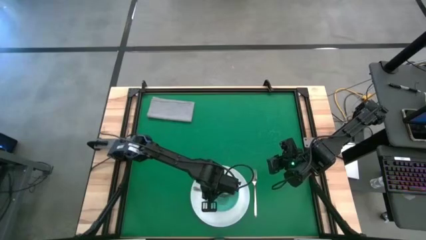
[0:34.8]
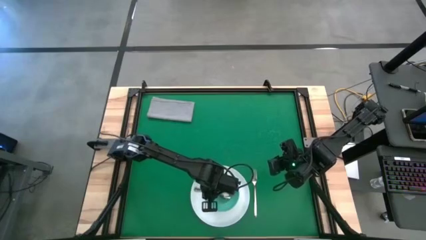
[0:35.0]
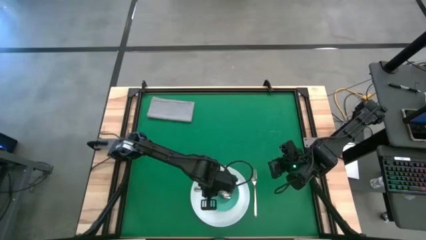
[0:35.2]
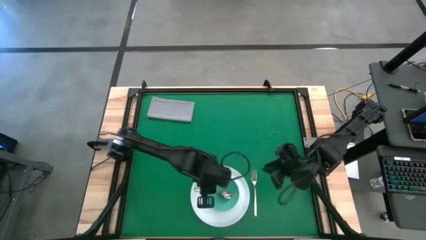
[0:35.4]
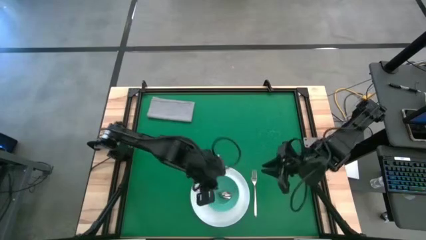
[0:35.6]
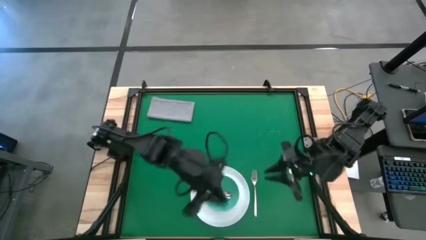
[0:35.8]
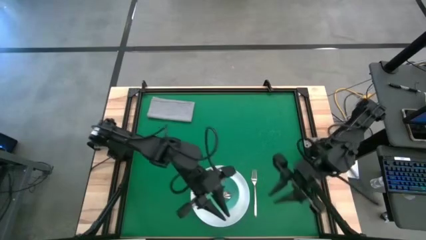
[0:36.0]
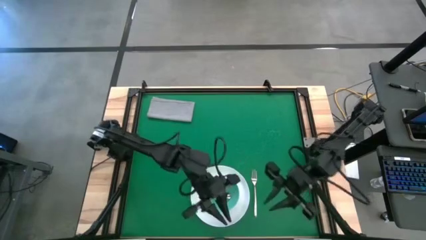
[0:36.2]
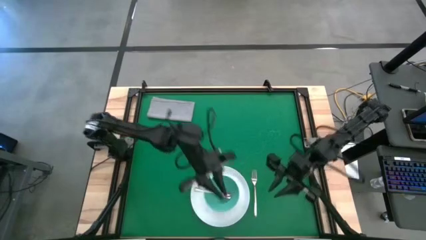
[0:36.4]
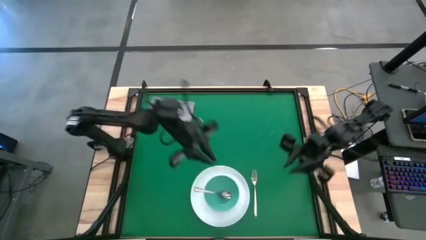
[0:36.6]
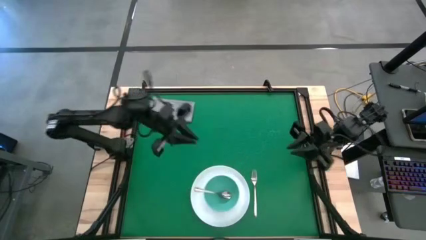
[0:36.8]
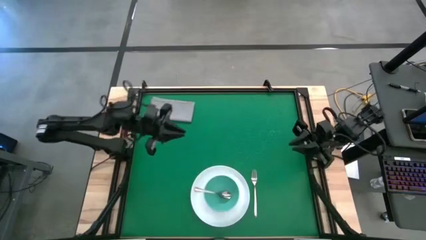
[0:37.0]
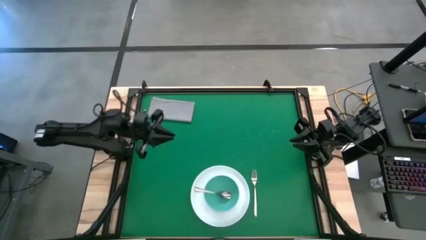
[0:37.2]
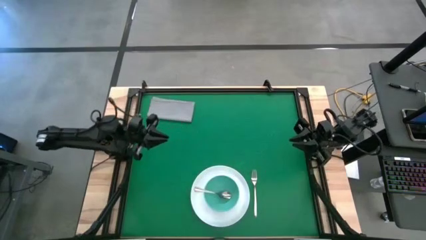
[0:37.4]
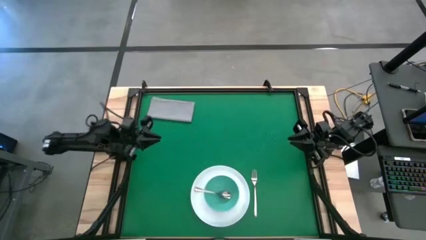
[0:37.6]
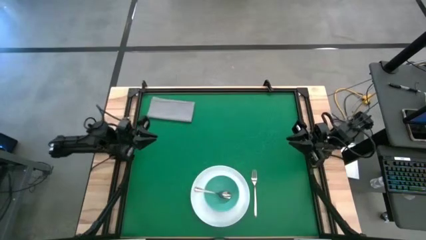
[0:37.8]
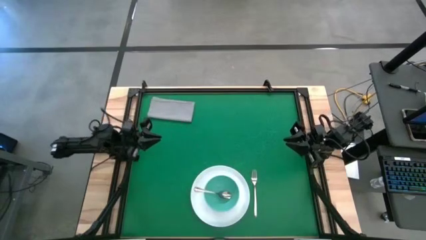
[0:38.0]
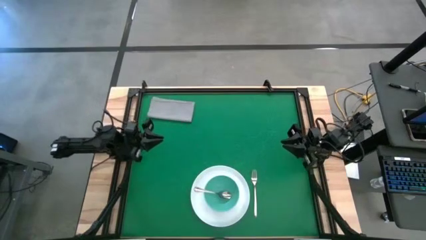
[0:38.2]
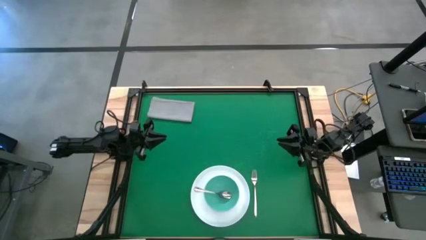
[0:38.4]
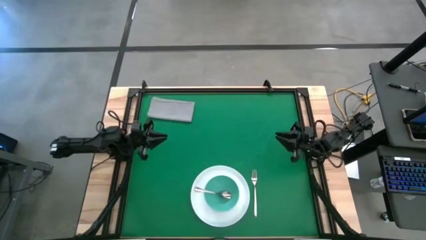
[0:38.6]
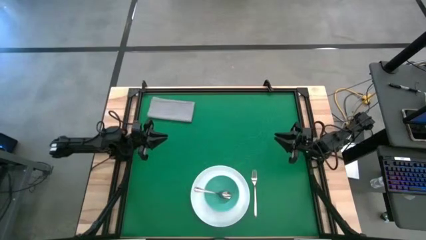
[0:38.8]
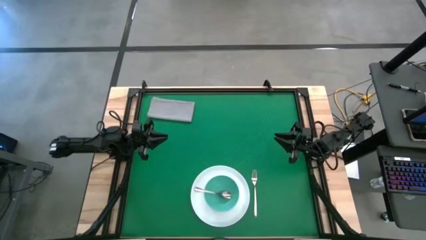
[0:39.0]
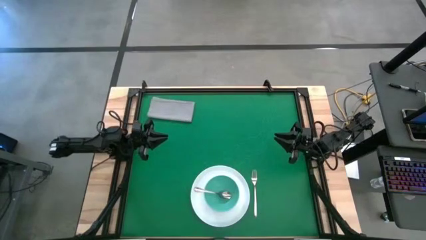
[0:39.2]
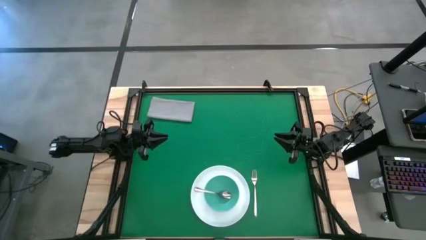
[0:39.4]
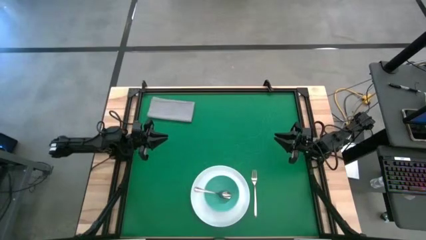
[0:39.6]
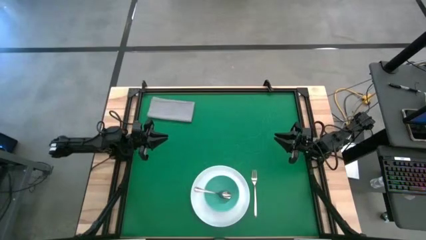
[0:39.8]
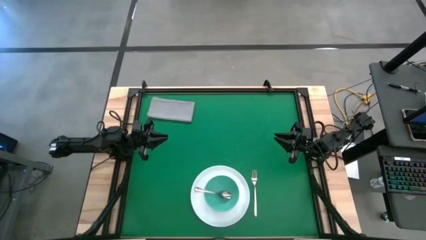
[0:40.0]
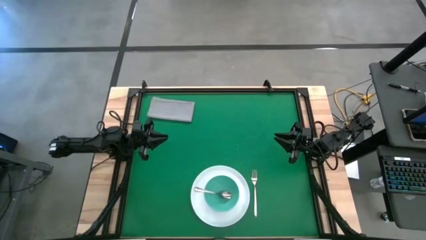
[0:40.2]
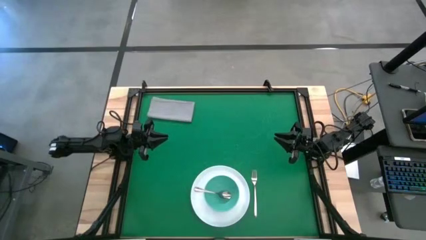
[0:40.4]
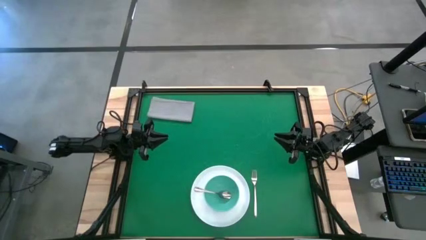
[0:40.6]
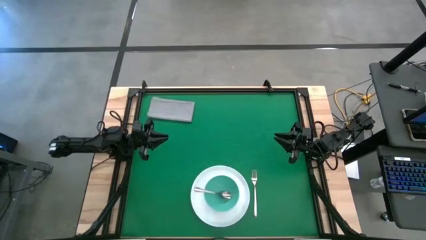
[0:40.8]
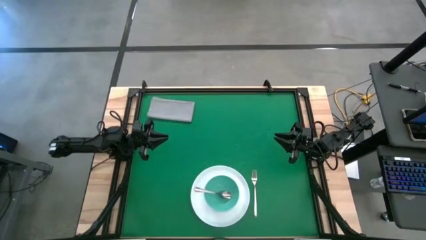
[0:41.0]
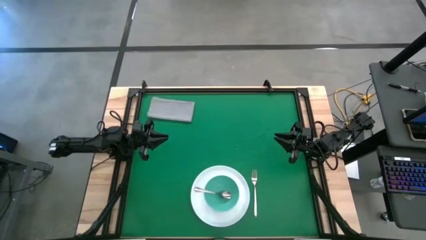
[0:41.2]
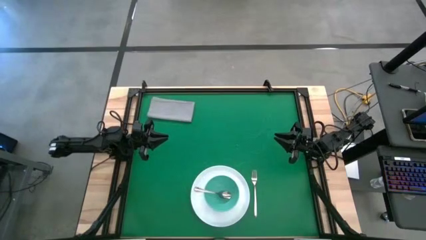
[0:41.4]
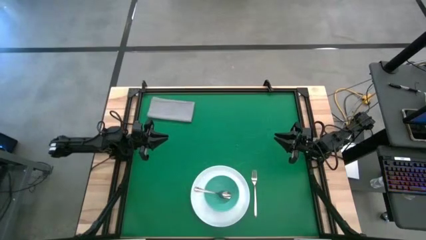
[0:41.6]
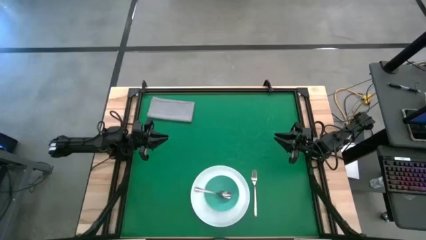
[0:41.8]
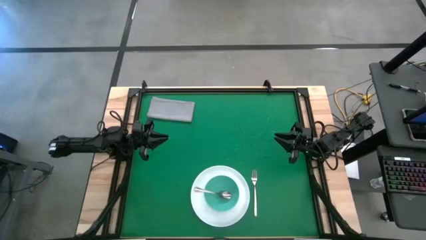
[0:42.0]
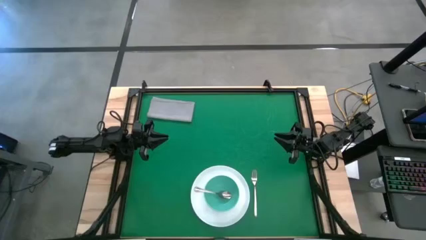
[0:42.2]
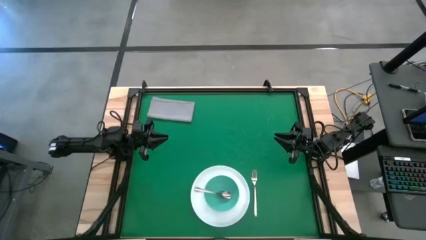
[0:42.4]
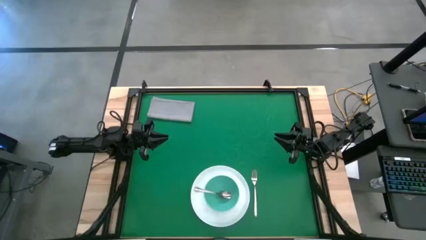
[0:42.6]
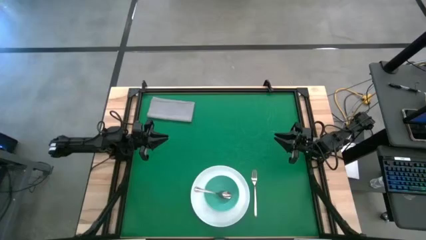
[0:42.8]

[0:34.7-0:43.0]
Task: Pick and place plate/cup/fork/spoon on tray
Return to Home Position

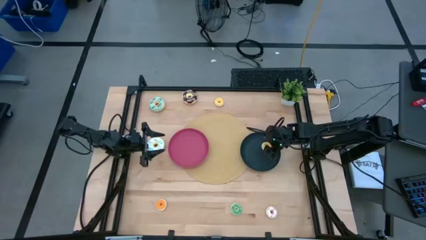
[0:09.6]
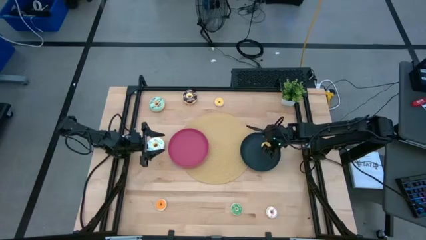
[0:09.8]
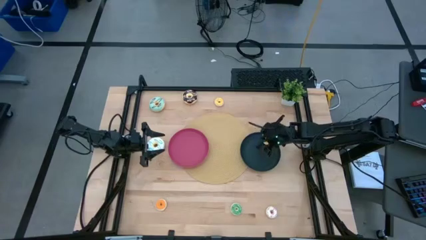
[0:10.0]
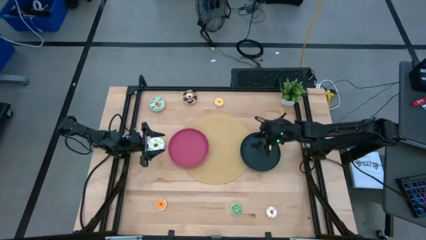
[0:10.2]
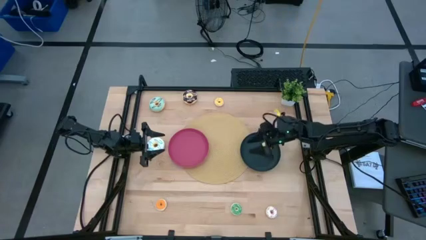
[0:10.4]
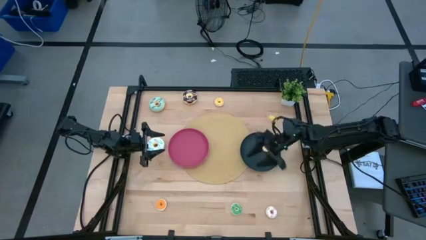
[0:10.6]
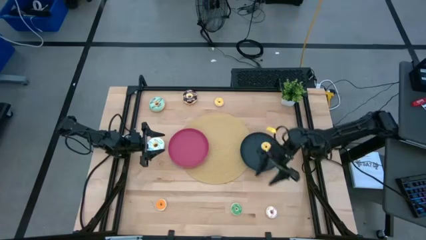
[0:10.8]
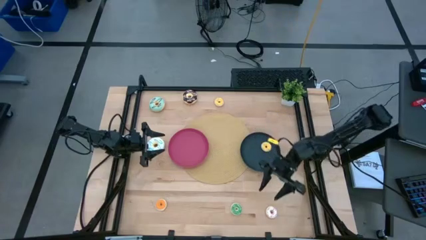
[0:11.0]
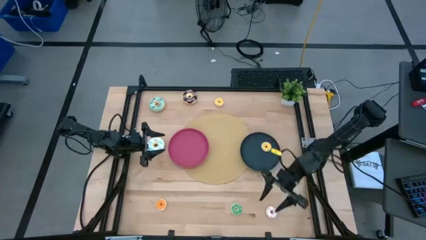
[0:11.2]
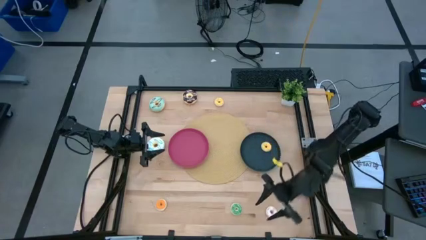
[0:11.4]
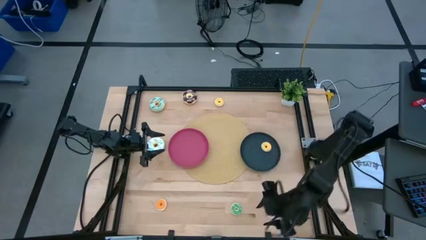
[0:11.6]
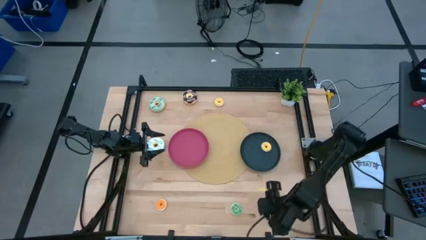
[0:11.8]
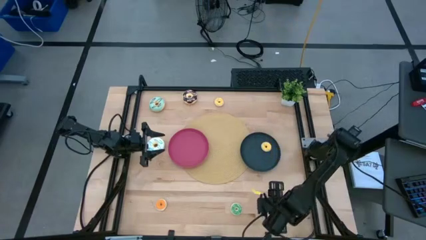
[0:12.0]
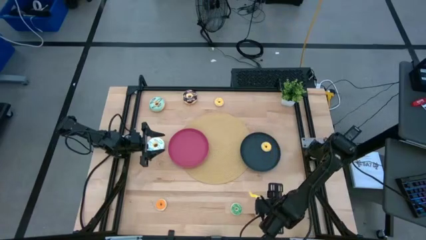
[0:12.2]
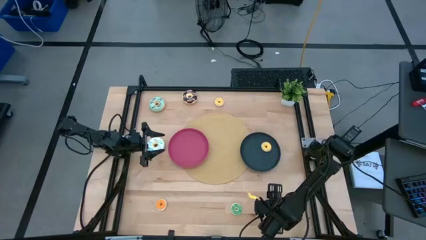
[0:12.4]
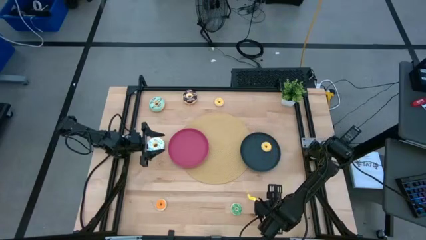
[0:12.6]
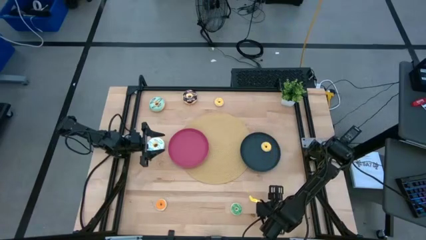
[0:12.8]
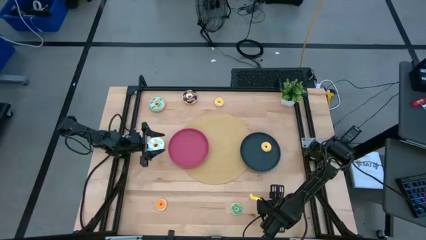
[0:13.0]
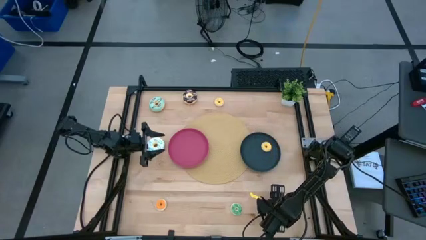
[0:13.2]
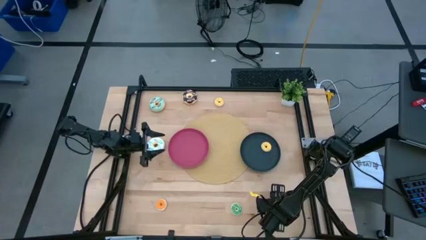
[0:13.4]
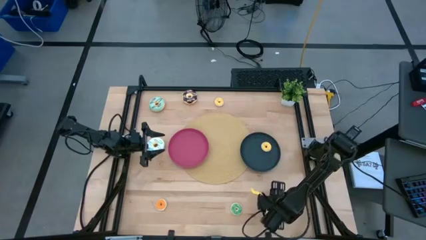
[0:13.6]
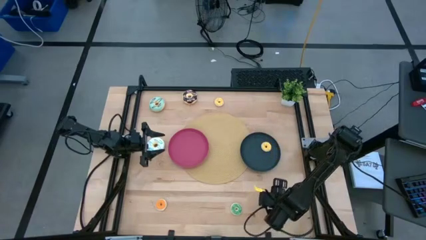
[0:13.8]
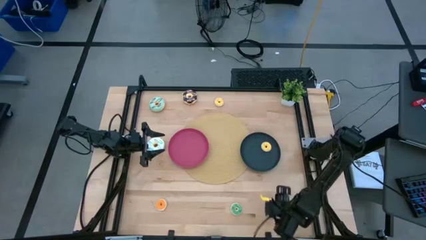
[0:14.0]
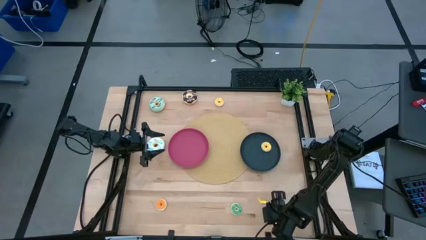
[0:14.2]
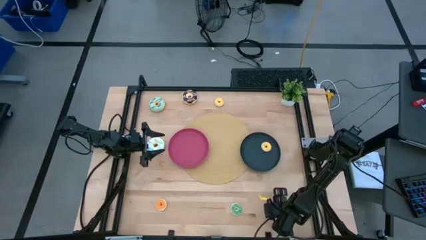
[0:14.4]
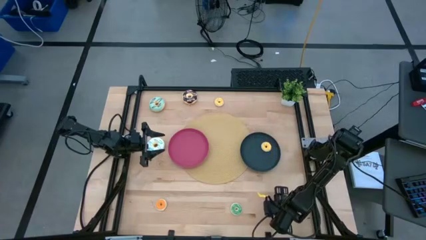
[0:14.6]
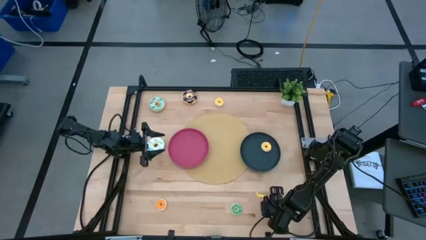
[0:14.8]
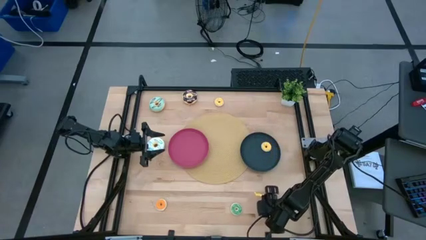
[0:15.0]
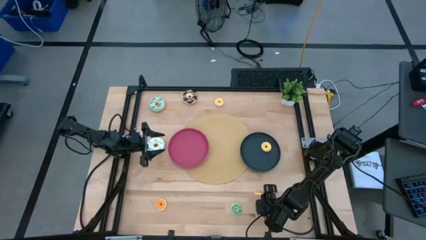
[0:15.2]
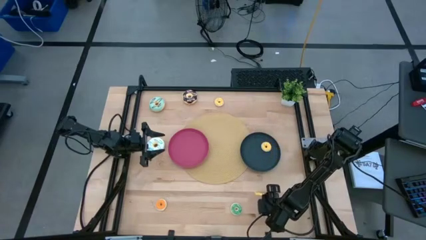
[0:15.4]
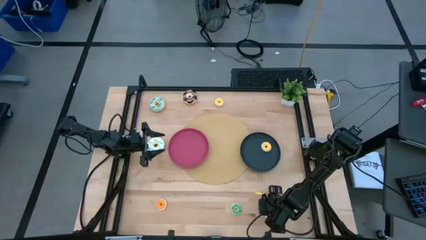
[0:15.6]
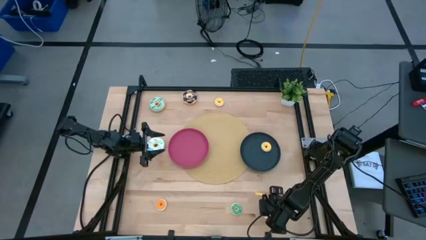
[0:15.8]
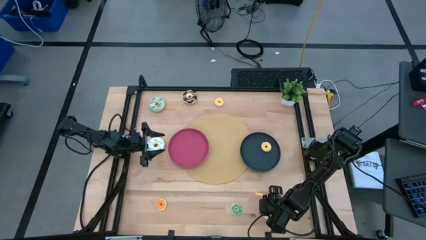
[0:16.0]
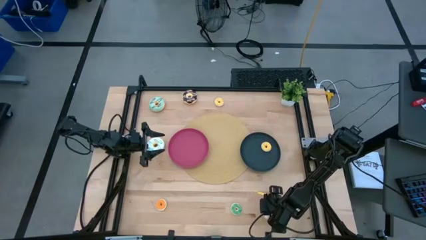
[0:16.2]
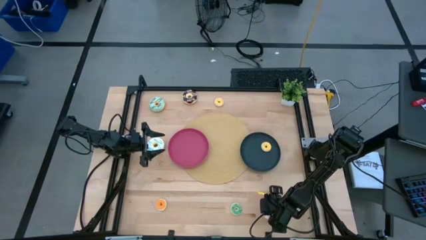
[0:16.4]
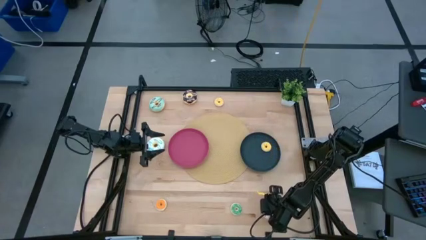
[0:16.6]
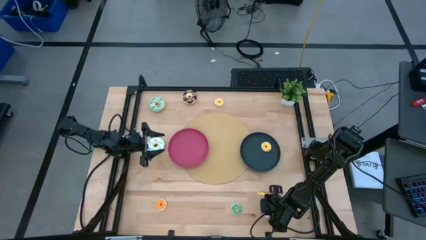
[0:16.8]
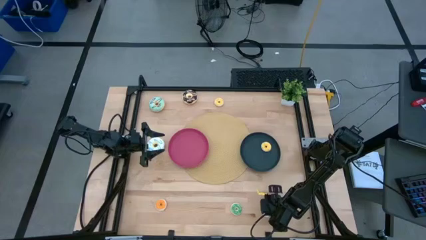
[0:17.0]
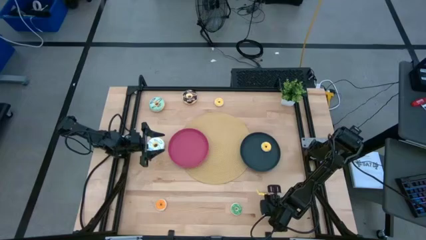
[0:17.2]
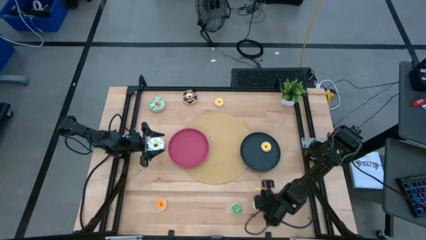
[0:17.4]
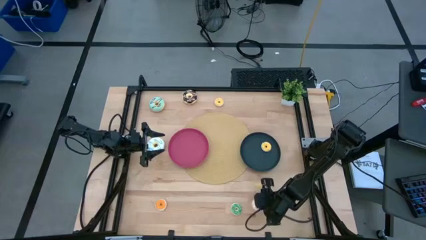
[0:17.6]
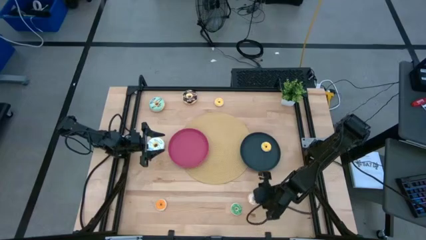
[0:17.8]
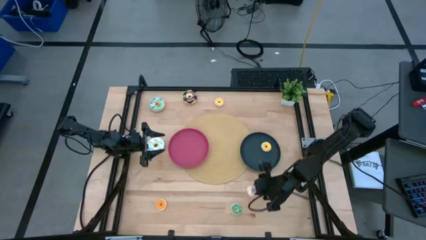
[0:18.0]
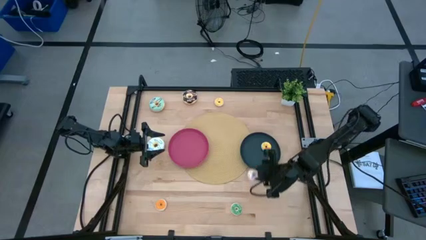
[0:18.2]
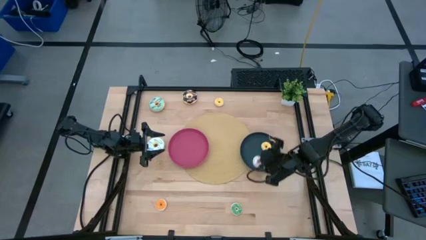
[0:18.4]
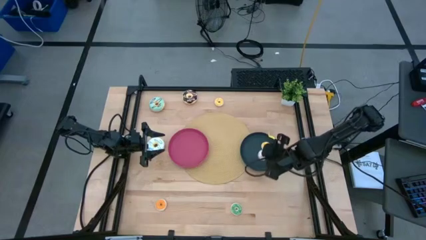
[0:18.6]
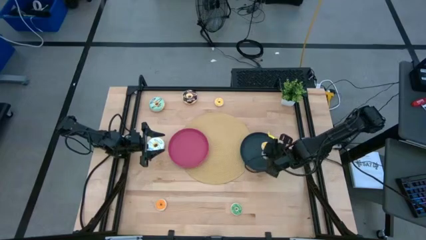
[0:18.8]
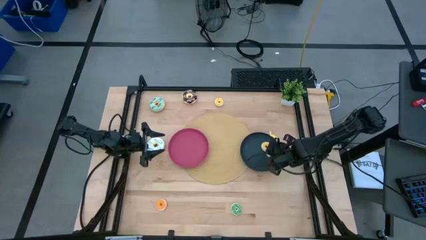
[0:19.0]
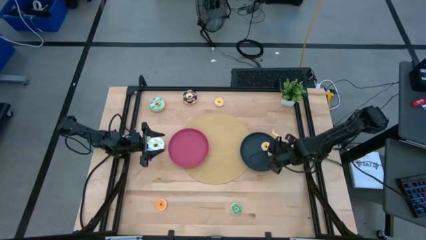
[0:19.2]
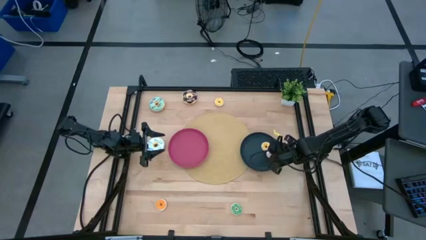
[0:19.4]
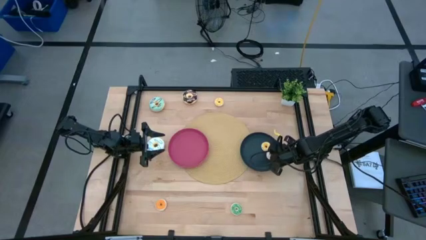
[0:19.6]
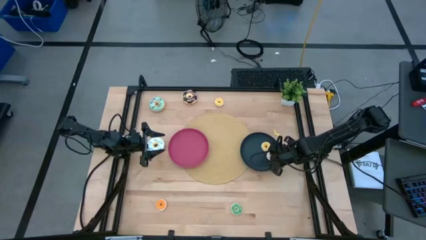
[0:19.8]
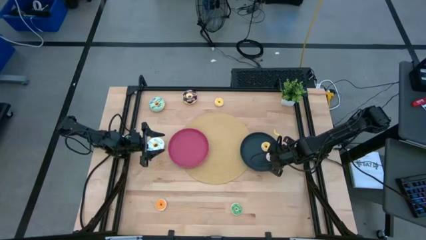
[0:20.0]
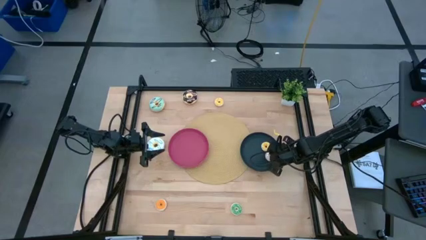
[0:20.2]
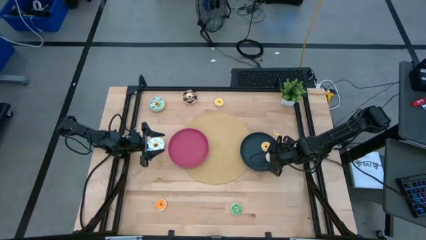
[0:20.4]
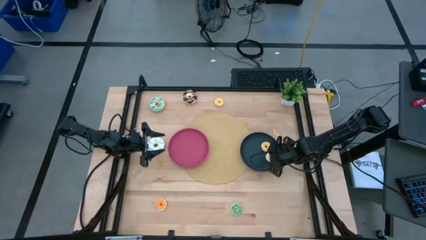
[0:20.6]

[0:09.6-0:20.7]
Task: Pick & Place donuts
Put the small white donut on the black plate
